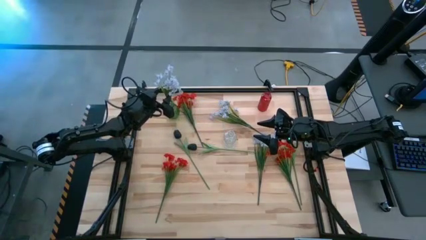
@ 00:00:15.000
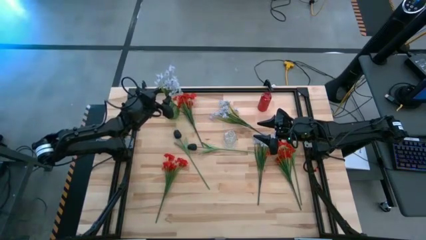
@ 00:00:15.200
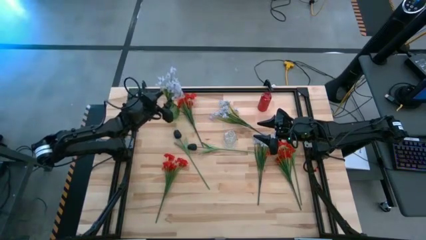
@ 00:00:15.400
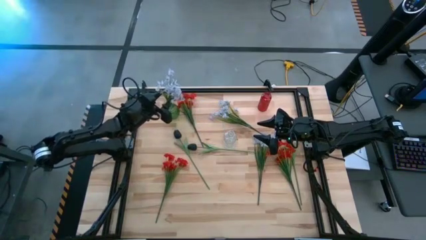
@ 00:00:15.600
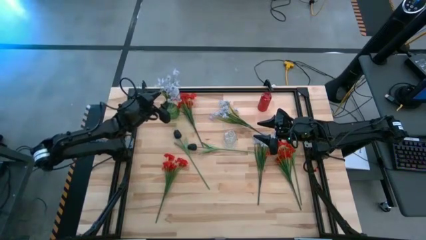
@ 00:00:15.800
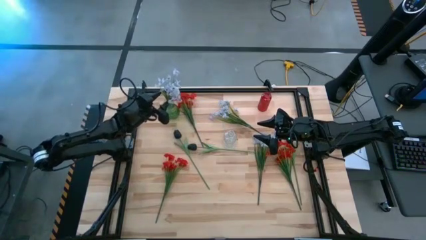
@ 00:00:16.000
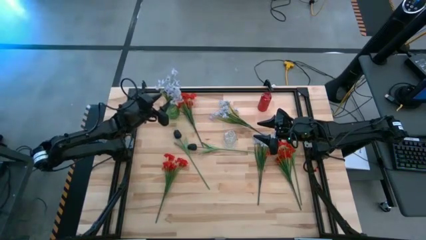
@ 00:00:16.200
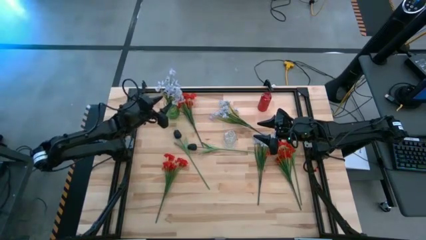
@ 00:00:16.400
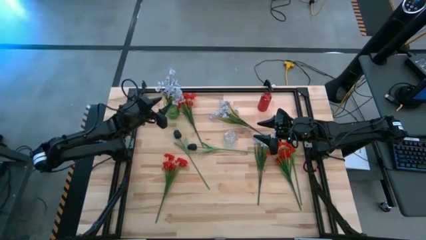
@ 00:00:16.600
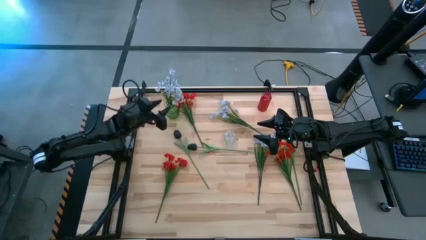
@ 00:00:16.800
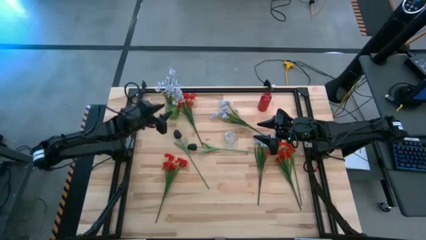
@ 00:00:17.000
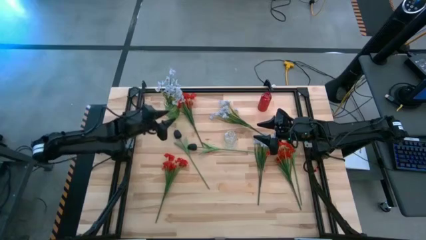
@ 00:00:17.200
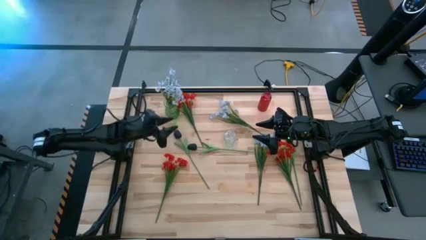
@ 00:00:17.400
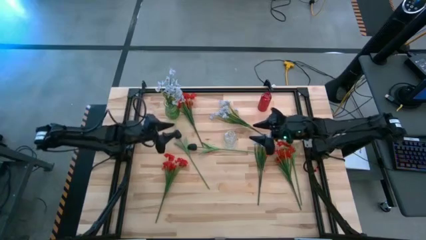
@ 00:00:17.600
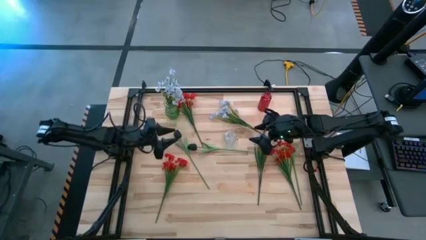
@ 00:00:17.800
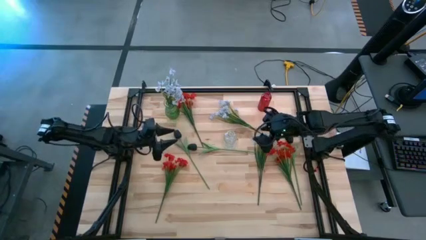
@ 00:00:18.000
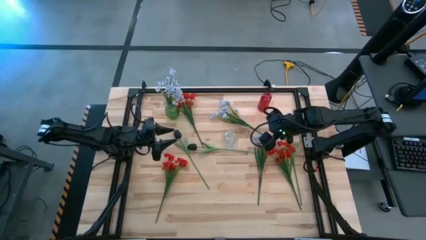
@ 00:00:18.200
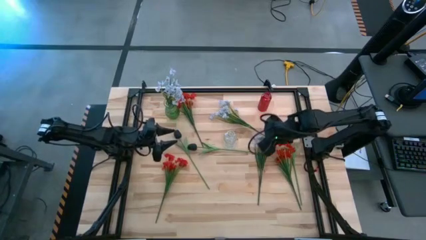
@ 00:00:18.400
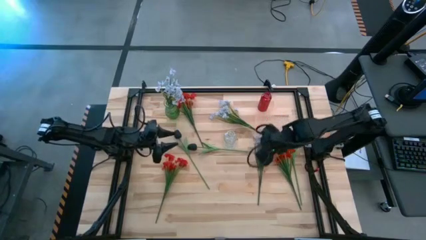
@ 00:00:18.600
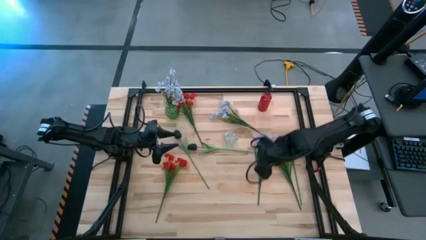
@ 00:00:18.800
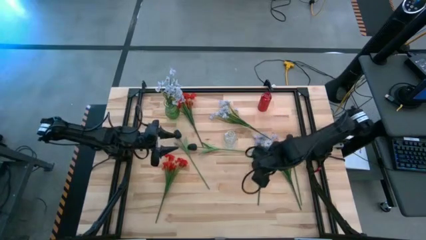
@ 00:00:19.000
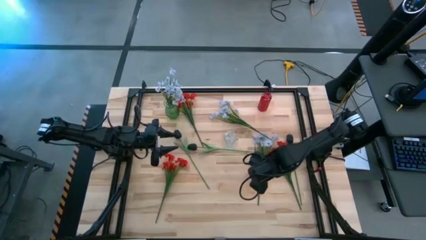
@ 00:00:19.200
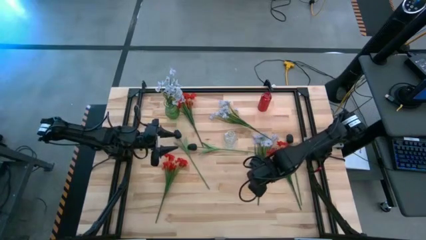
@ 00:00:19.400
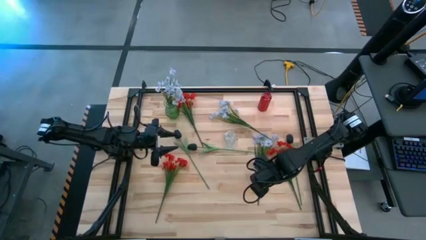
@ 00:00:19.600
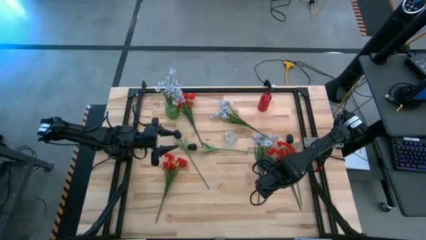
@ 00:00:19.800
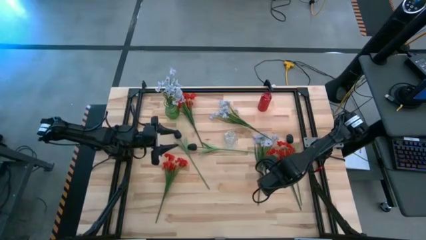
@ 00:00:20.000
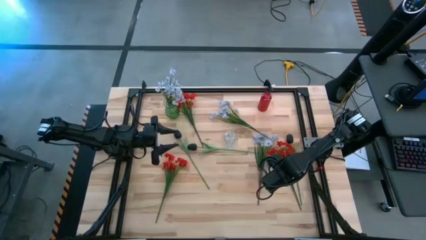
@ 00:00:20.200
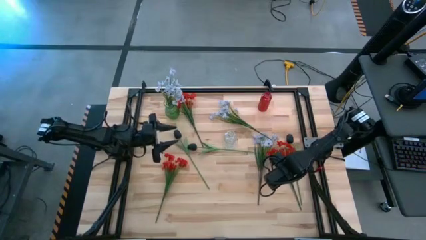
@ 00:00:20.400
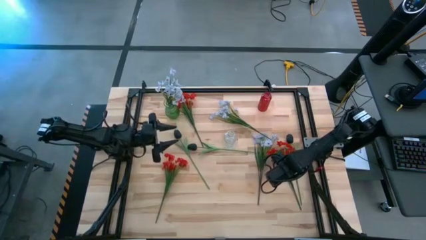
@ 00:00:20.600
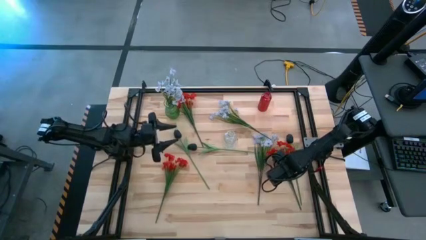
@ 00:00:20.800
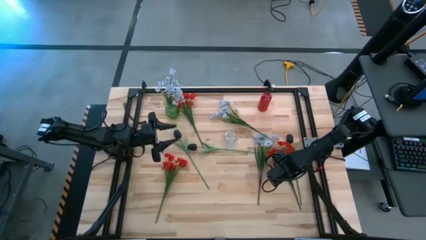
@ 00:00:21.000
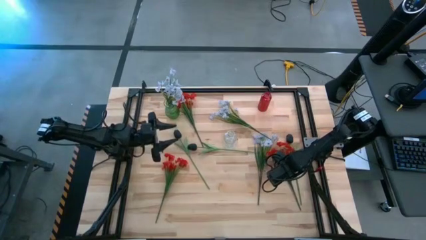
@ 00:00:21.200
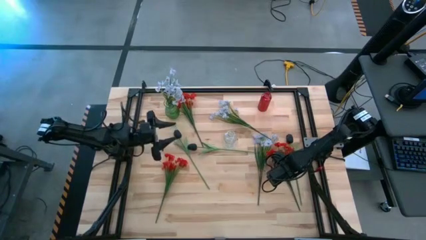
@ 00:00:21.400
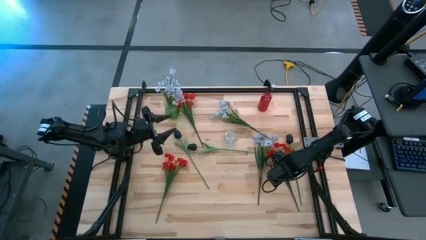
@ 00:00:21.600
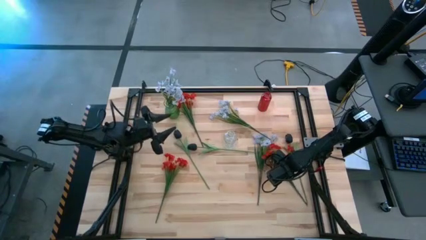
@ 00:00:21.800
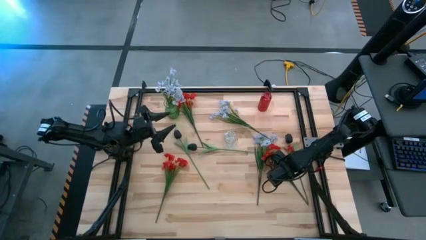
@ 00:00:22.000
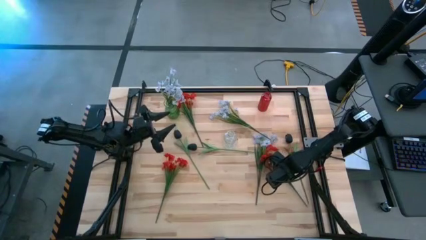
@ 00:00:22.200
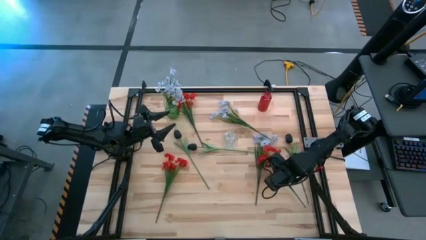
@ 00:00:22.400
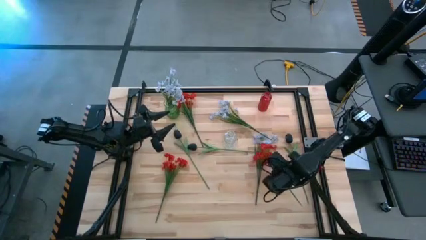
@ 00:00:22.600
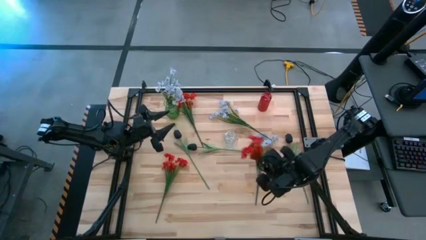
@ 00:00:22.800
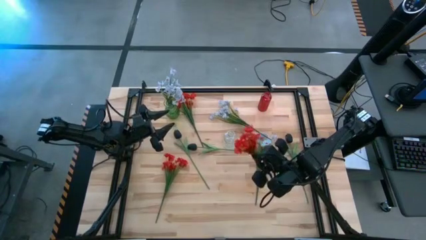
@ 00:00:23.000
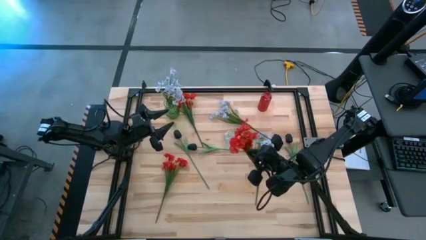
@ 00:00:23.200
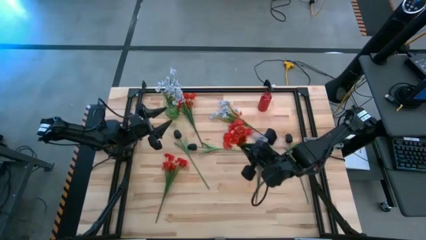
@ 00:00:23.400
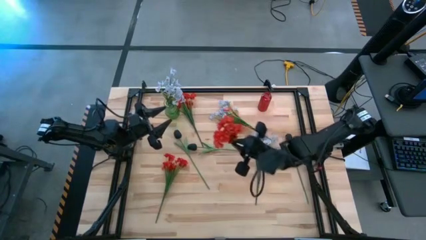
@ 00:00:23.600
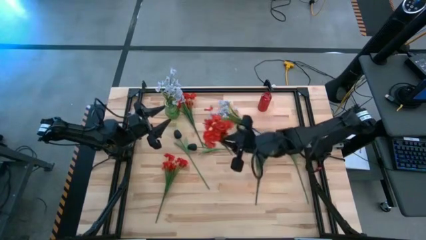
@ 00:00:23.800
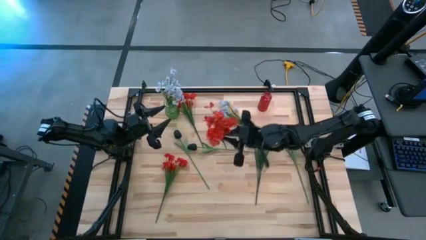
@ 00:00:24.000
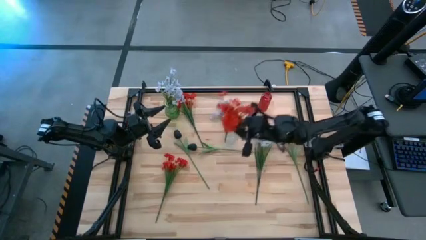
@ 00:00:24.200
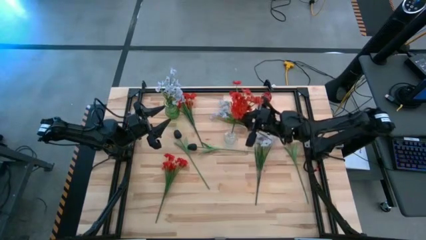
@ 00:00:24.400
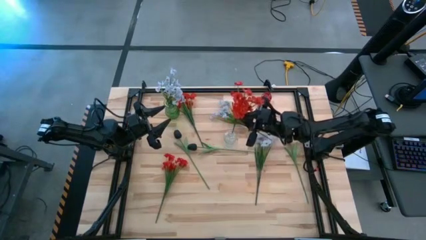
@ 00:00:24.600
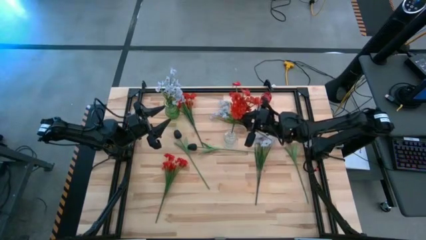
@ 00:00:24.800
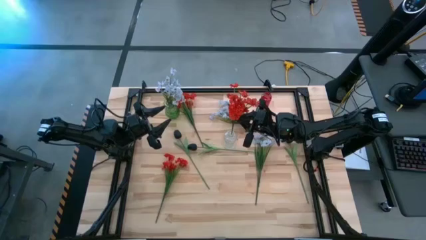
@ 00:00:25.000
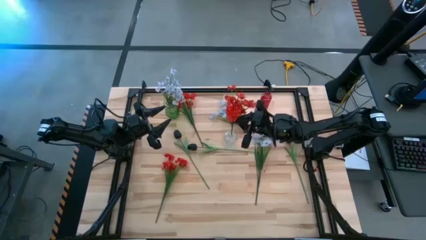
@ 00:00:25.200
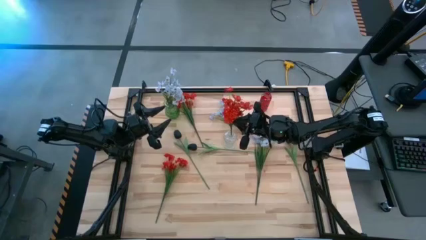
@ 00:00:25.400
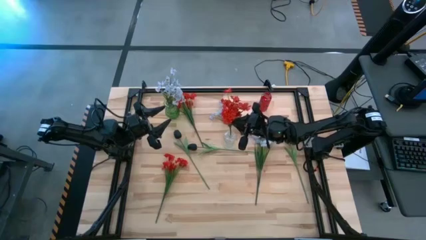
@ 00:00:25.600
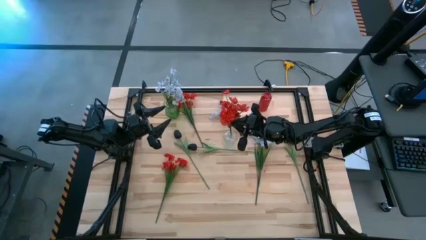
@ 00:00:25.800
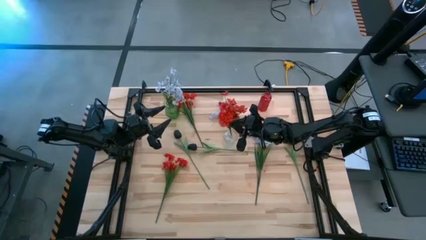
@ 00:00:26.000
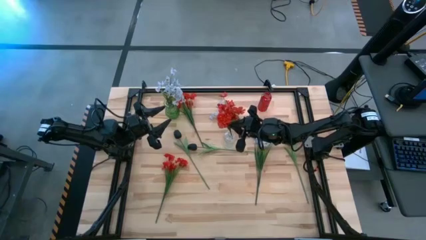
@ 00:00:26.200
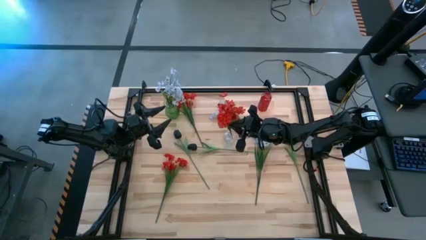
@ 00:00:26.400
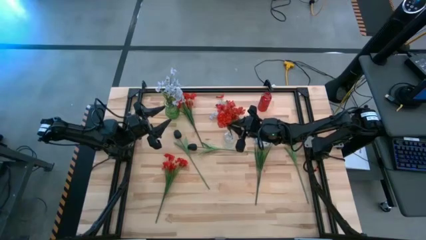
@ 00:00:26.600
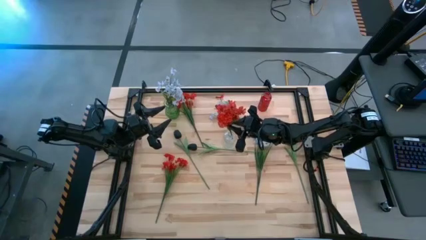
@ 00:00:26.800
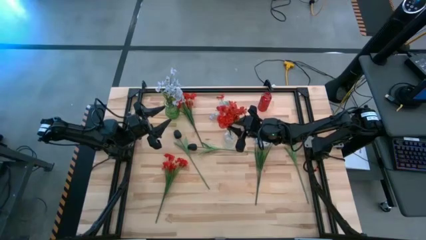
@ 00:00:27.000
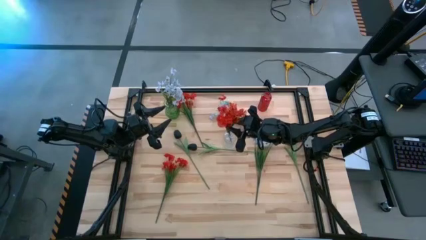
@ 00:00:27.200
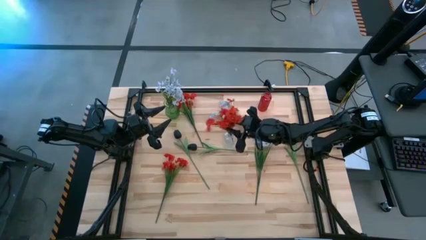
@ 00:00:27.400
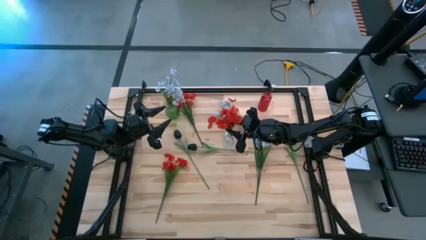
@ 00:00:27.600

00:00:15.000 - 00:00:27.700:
Task: Sort flowers into vase by color
Put the right red flower into the transparent vase

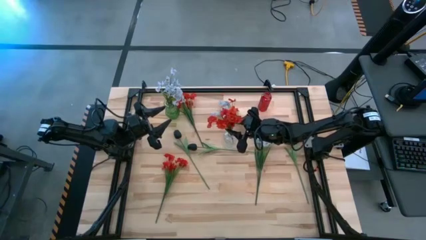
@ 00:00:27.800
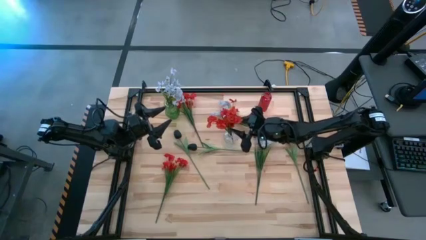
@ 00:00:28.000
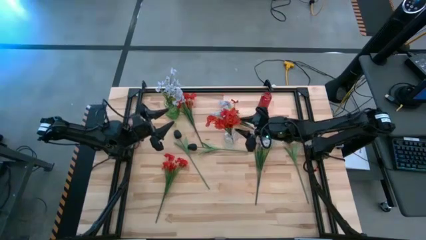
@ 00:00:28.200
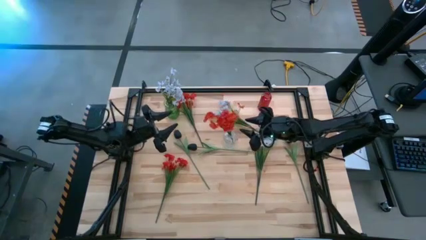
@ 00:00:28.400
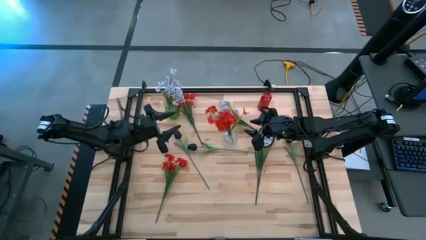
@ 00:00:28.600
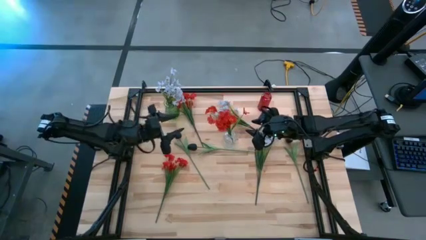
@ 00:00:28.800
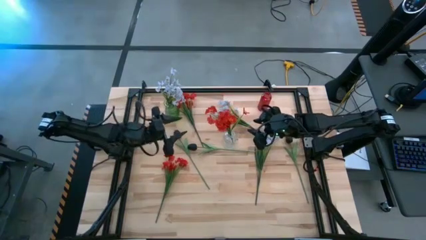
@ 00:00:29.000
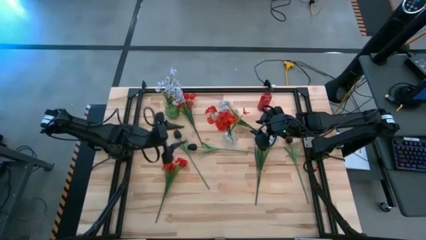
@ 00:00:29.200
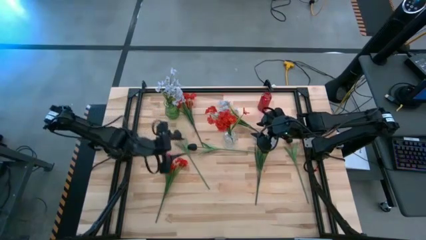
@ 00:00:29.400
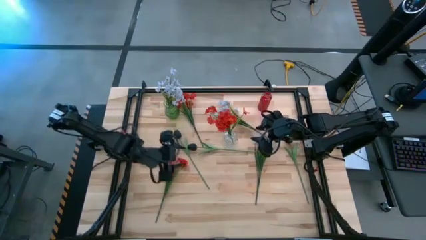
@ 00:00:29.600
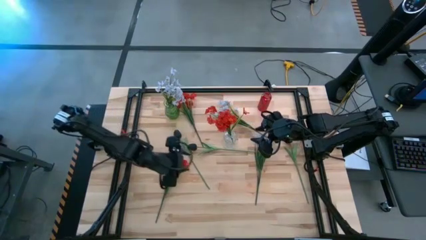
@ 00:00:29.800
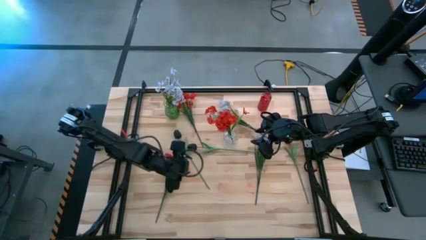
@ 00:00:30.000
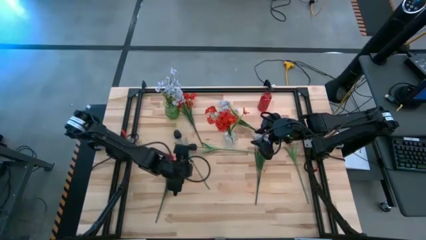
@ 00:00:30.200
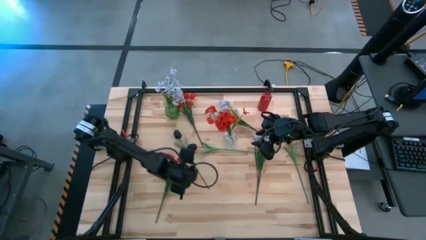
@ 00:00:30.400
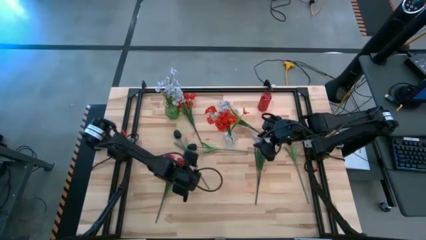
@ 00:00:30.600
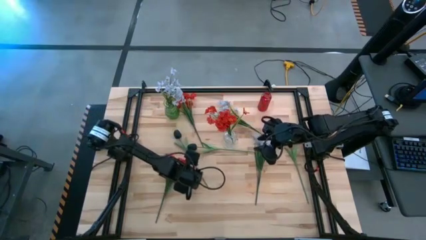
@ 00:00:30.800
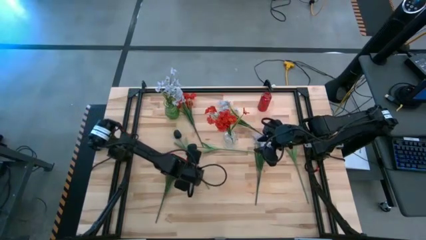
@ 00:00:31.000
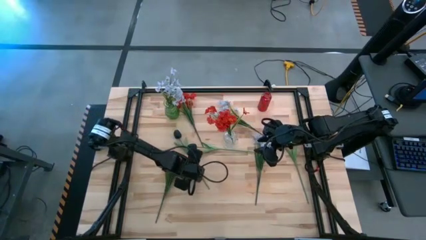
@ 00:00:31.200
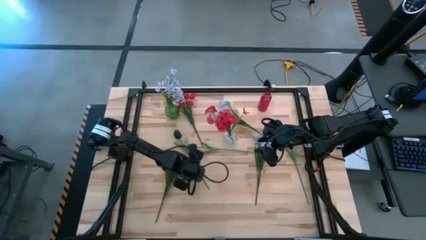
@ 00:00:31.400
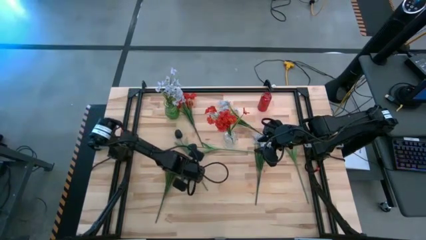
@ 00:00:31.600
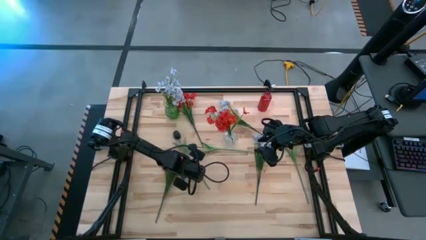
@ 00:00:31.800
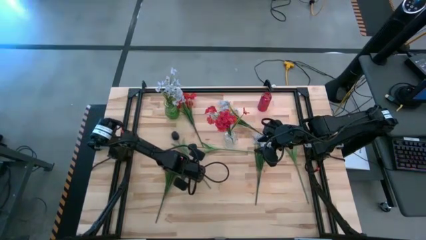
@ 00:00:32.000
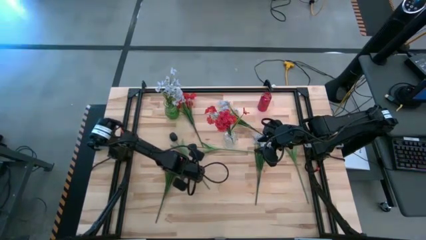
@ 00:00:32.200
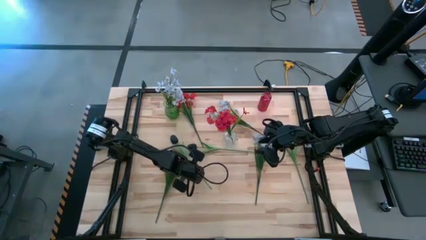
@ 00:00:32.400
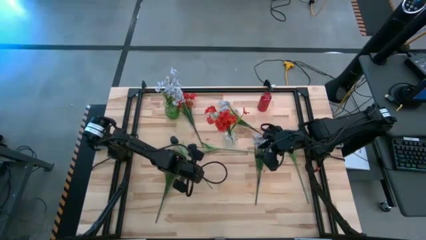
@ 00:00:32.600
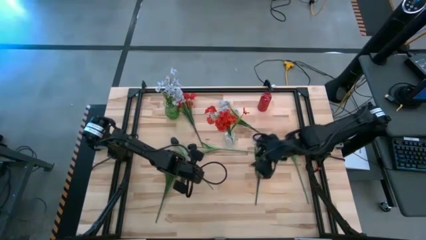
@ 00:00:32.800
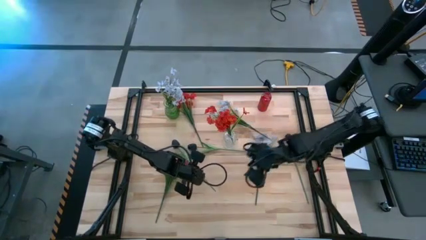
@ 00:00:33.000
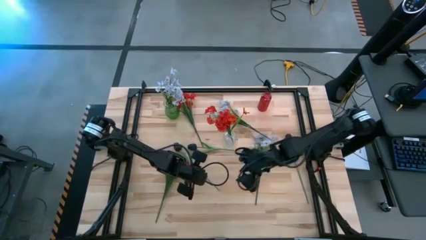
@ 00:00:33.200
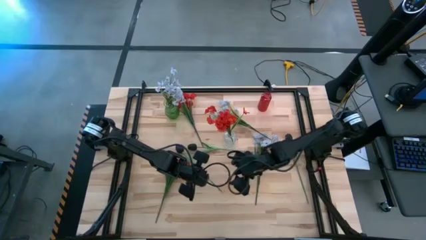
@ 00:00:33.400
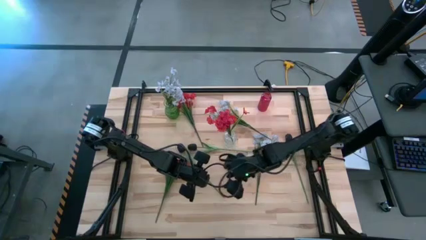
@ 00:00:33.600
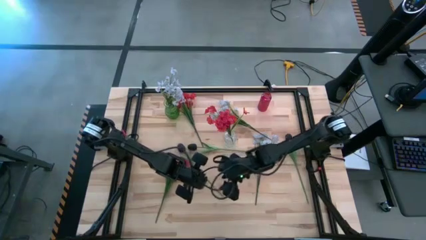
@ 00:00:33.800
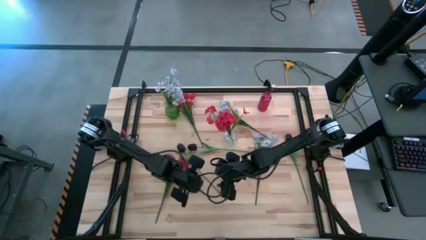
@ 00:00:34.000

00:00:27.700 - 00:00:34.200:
Put the left black flower into the red vase
